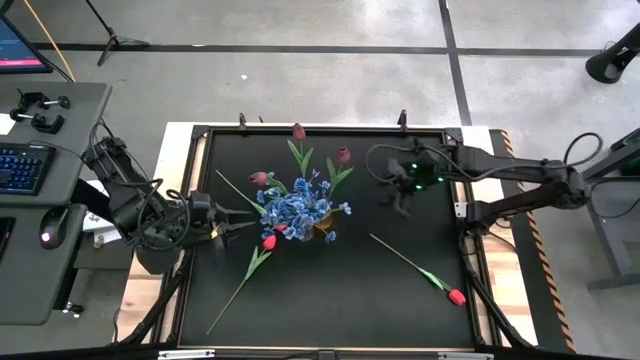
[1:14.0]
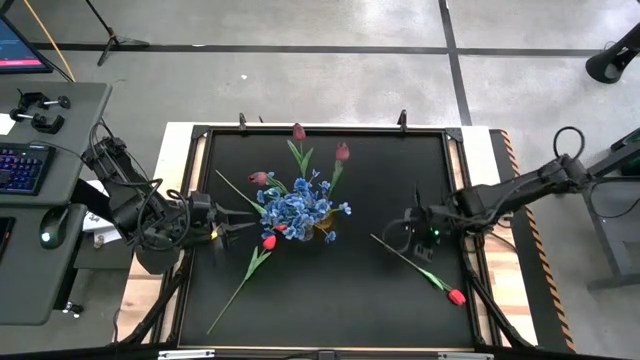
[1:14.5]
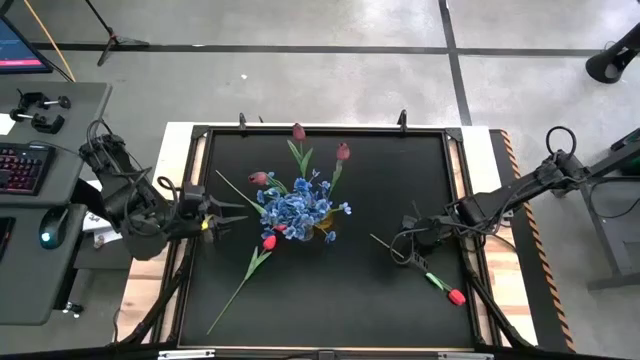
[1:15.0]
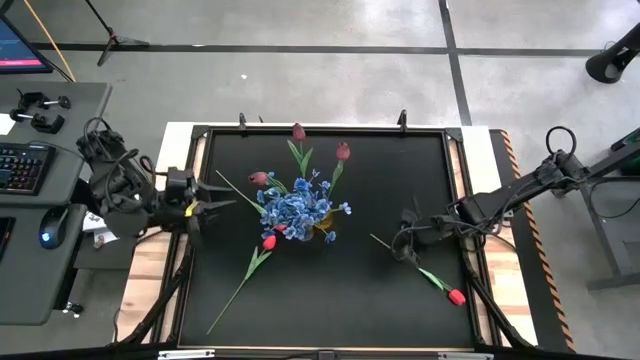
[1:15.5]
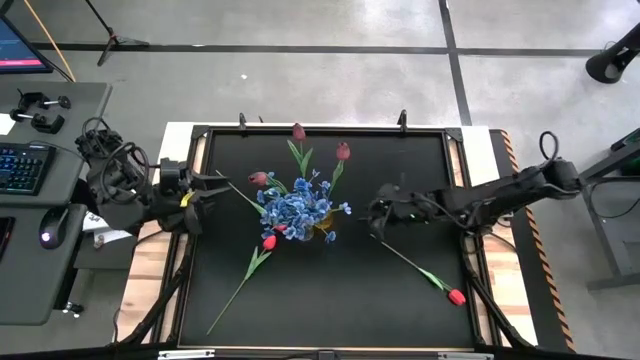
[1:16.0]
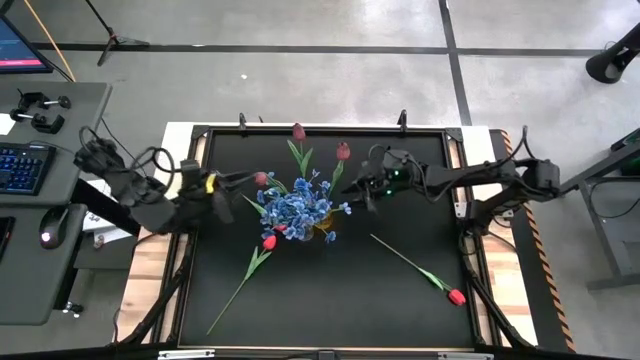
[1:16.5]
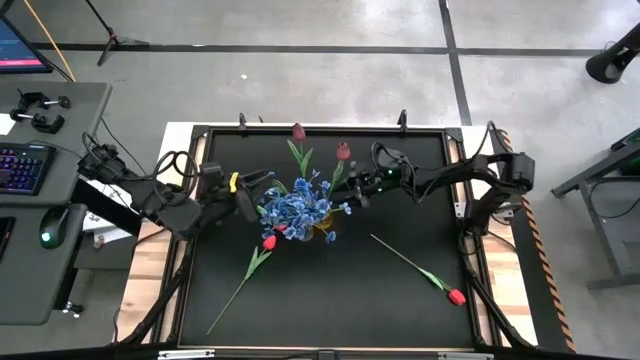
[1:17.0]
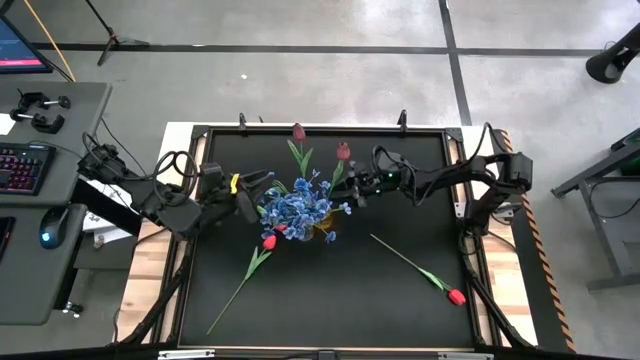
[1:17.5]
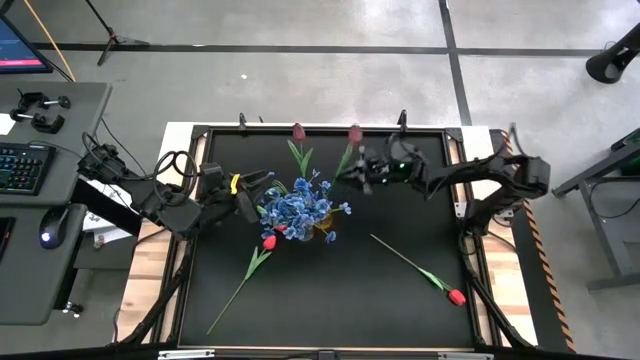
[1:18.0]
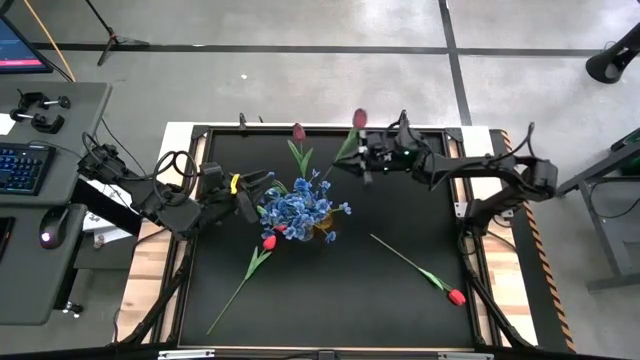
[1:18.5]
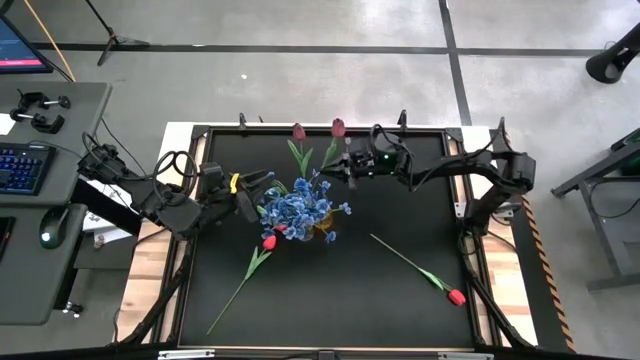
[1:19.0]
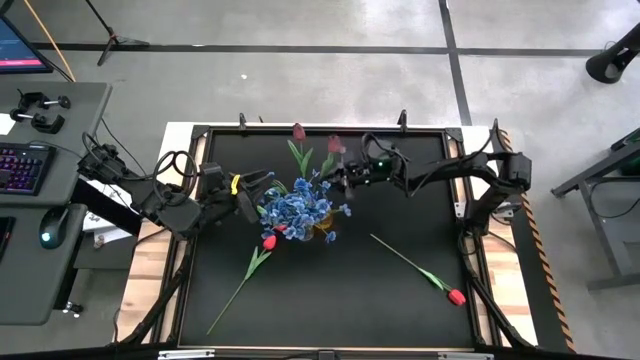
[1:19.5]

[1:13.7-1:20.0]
Task: Sort flowers into vase by color
Put the dark red flower into the pink vase

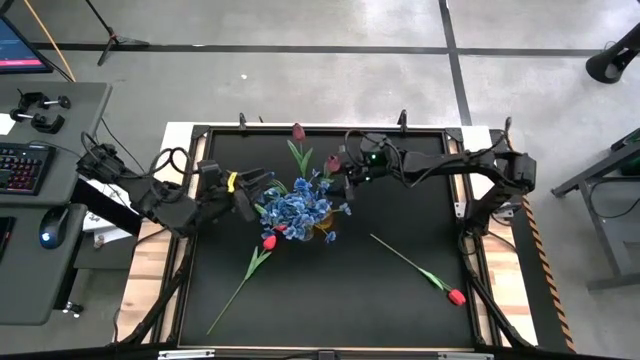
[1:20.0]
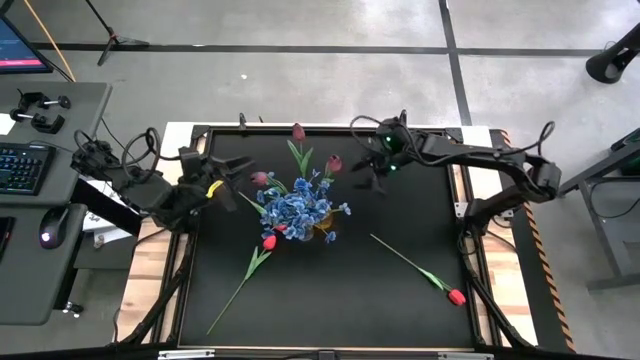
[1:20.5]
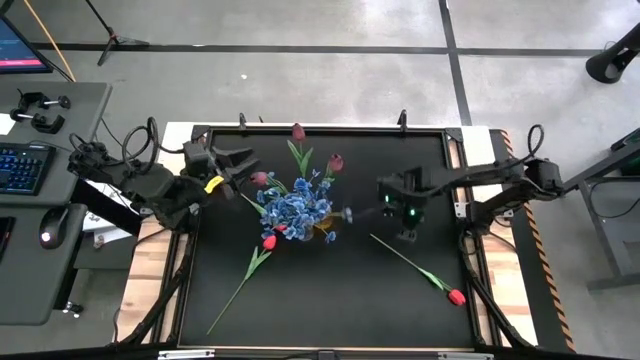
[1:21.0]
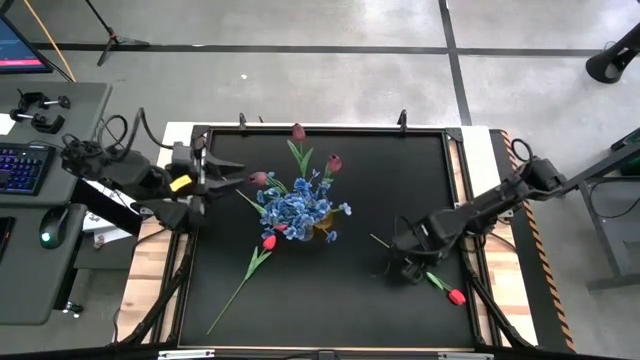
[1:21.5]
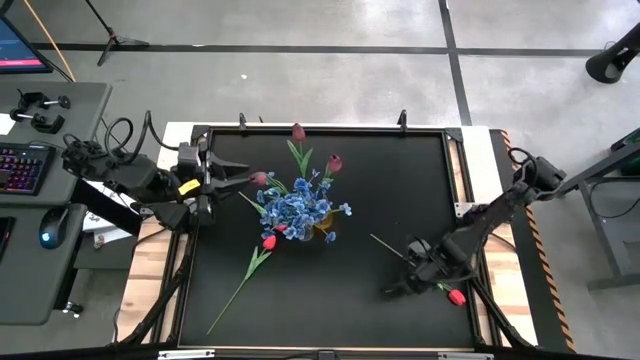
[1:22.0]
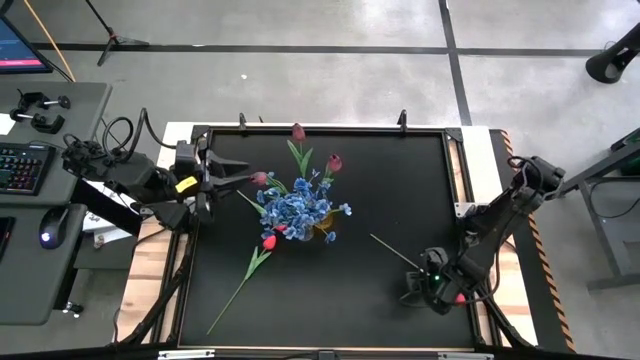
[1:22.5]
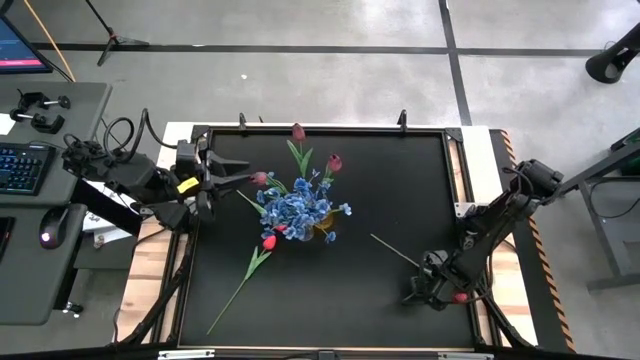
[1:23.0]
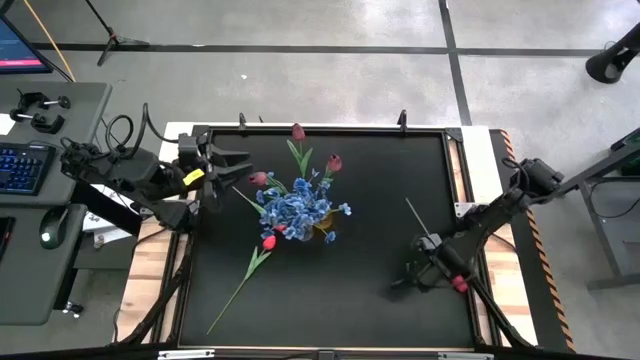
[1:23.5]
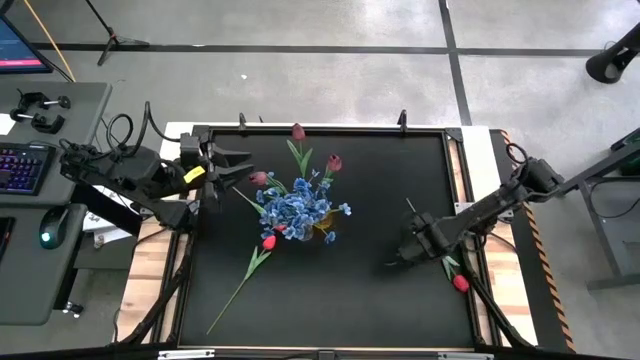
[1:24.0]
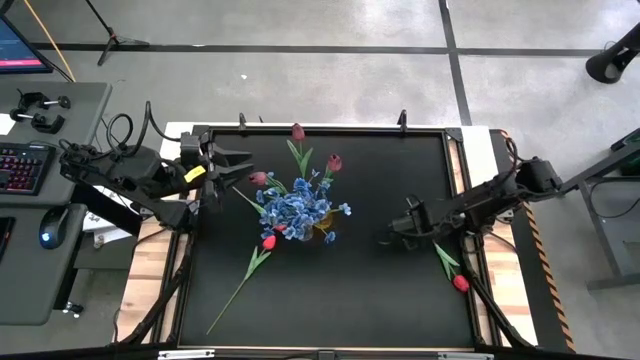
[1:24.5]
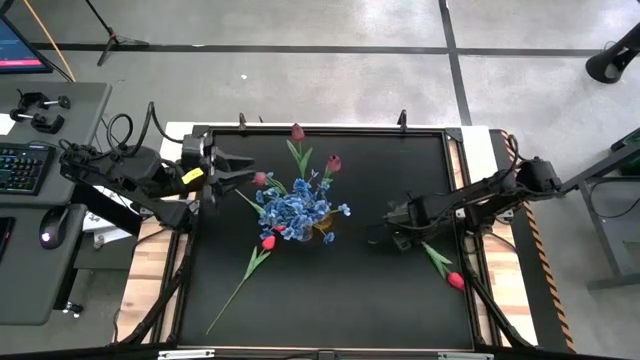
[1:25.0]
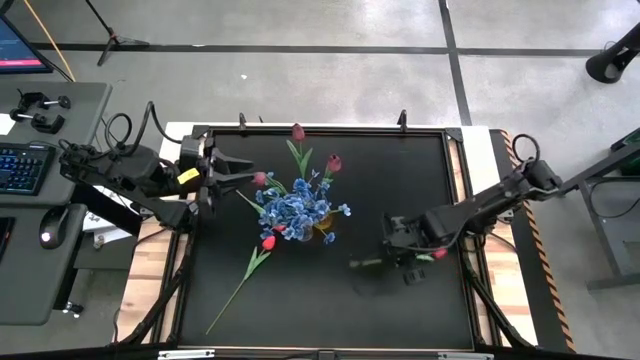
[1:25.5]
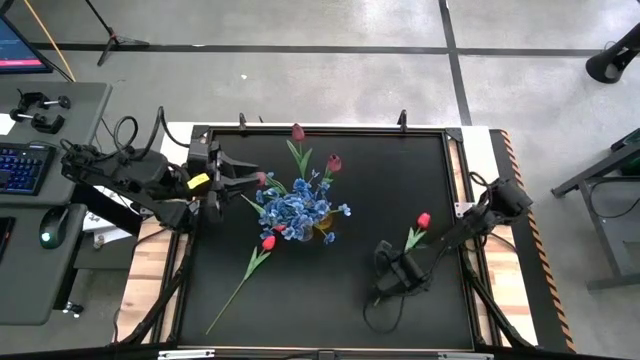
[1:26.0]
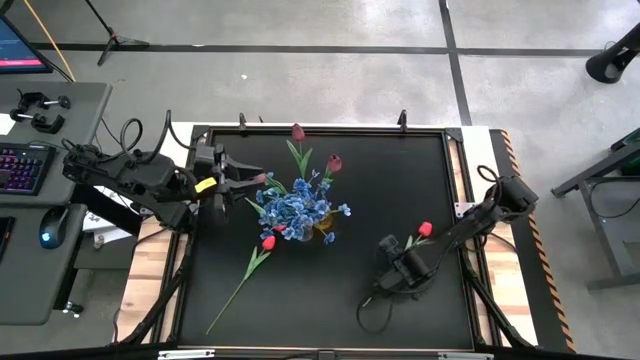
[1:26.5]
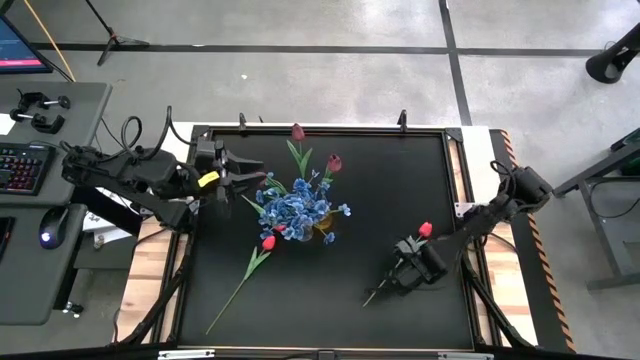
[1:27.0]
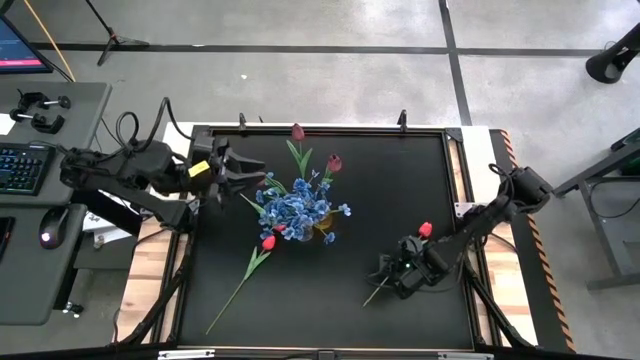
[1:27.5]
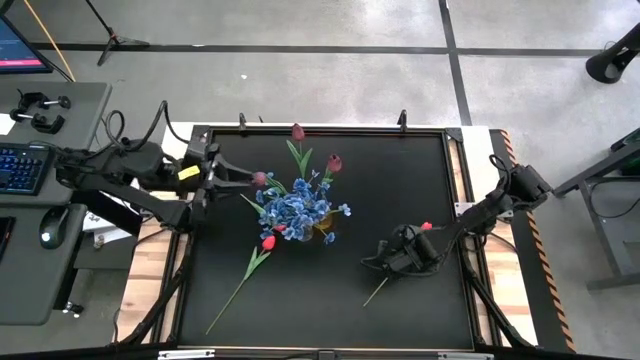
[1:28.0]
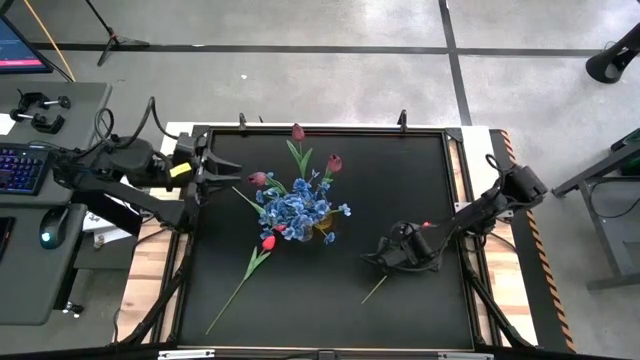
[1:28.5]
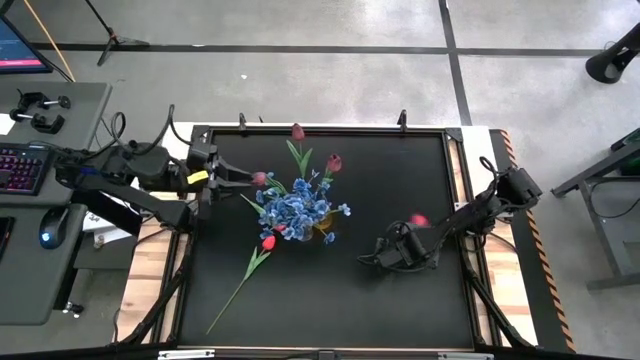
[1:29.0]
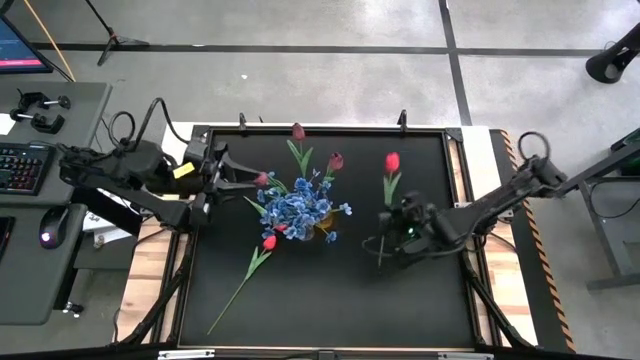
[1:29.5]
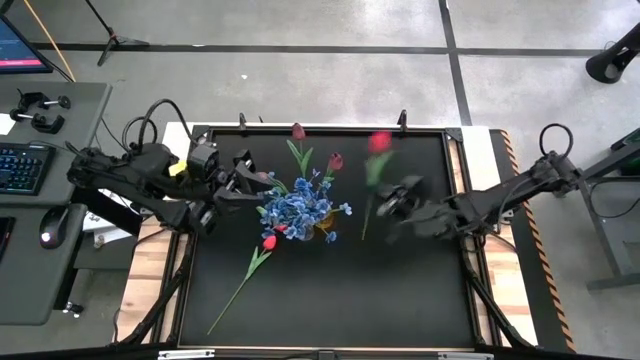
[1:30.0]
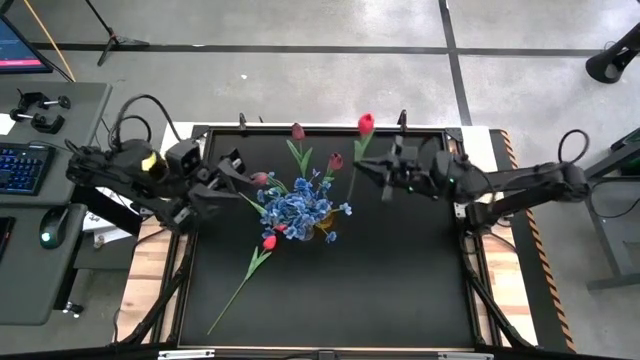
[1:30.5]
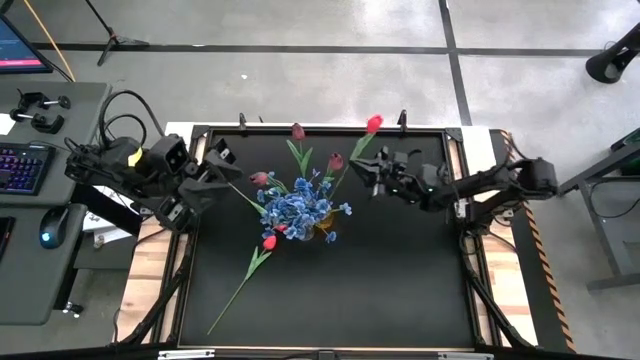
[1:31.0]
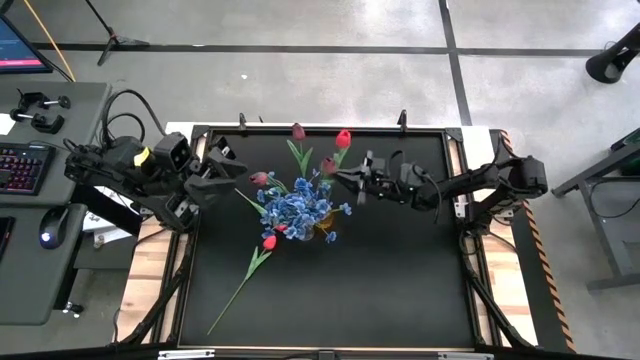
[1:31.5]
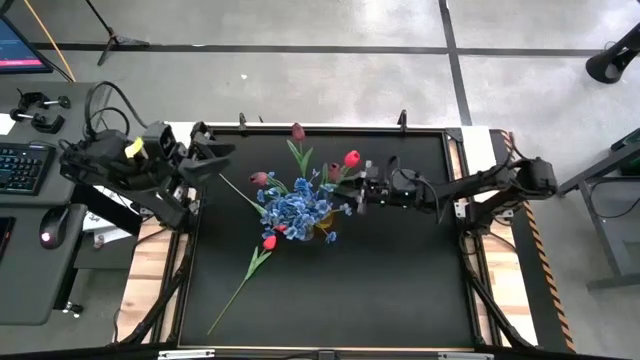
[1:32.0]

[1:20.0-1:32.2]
Put the bottom right red flower into the yellow vase
